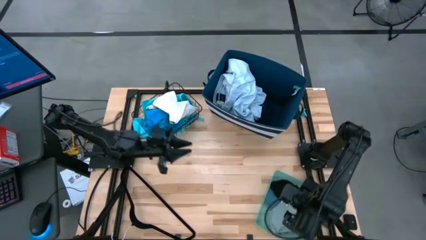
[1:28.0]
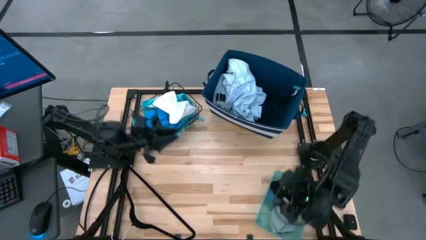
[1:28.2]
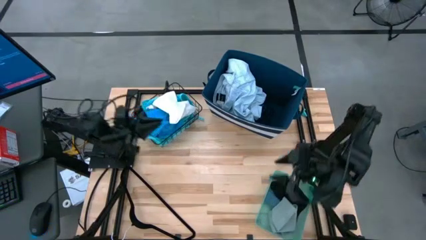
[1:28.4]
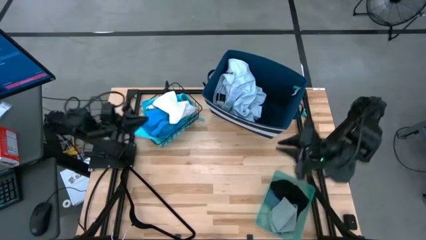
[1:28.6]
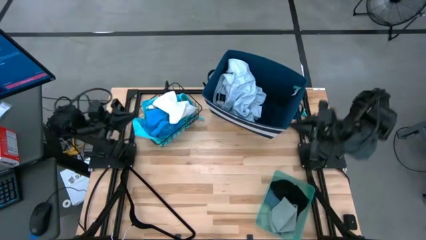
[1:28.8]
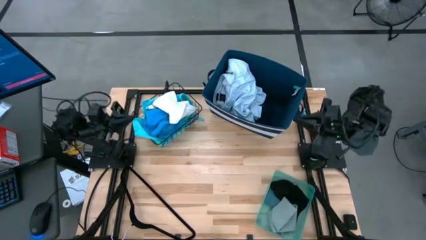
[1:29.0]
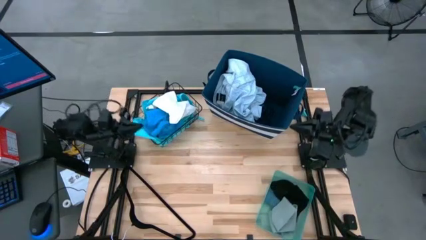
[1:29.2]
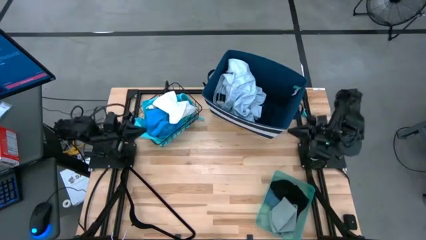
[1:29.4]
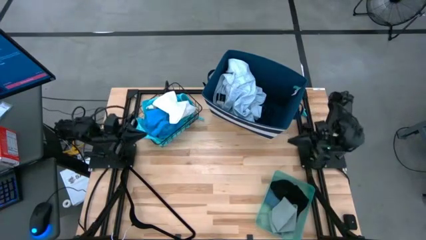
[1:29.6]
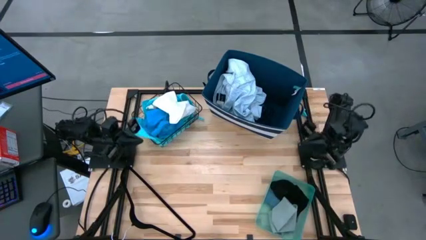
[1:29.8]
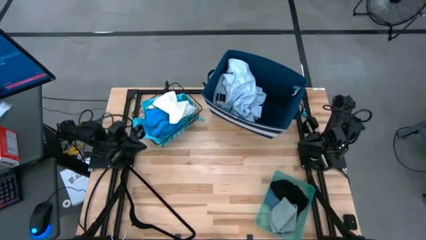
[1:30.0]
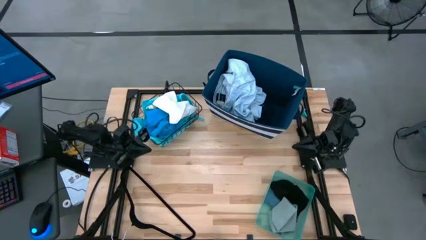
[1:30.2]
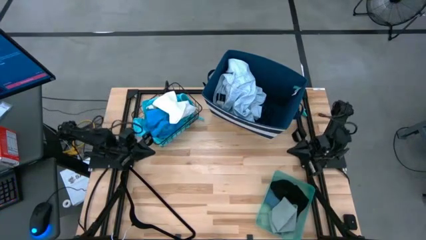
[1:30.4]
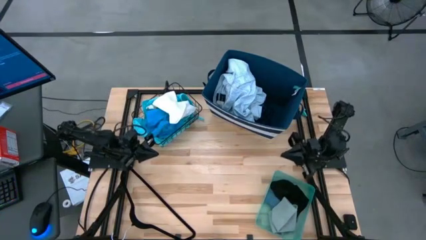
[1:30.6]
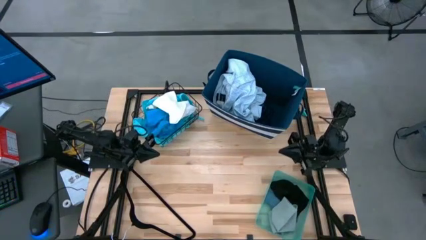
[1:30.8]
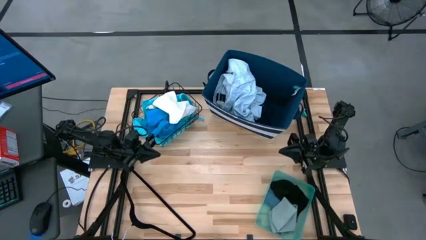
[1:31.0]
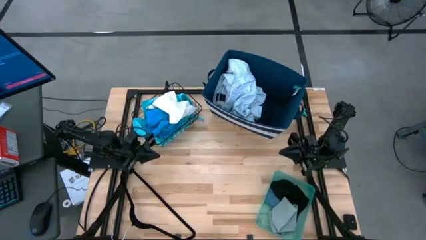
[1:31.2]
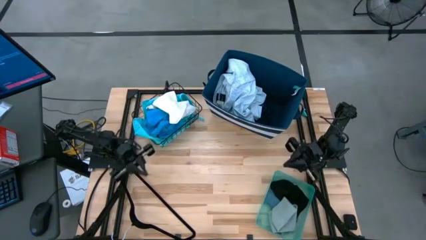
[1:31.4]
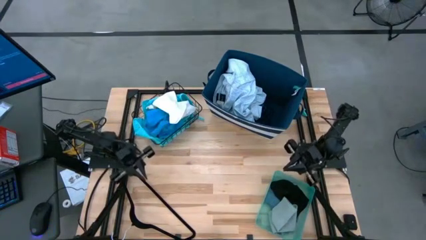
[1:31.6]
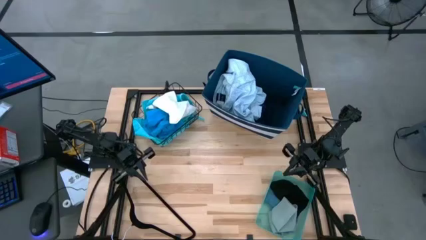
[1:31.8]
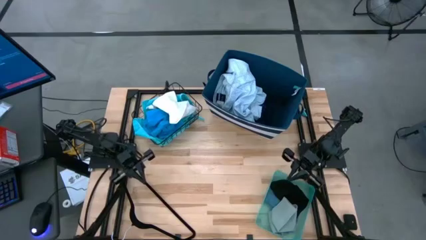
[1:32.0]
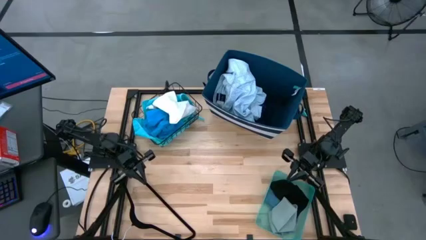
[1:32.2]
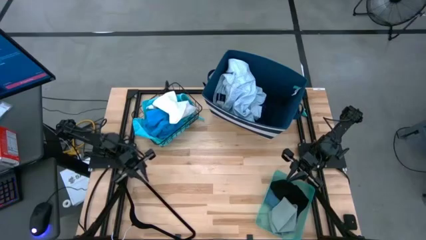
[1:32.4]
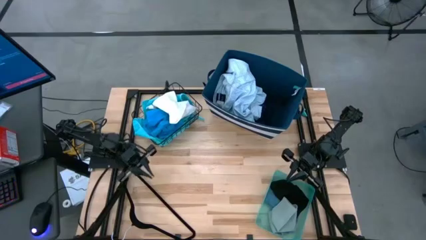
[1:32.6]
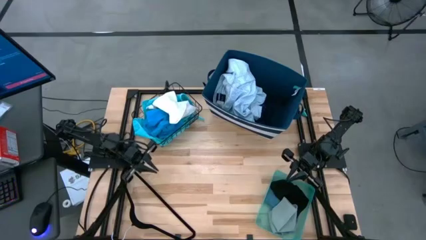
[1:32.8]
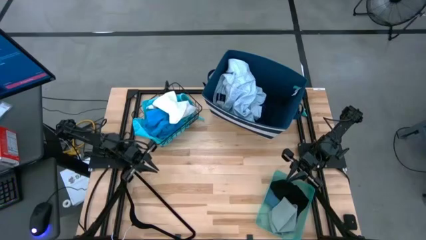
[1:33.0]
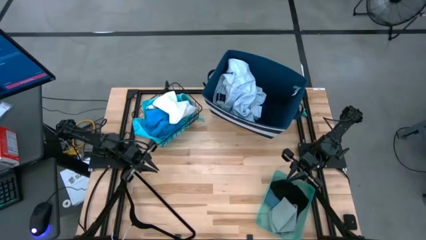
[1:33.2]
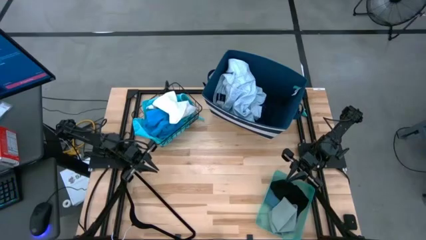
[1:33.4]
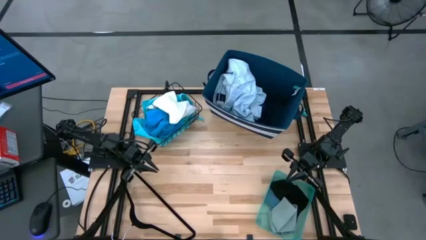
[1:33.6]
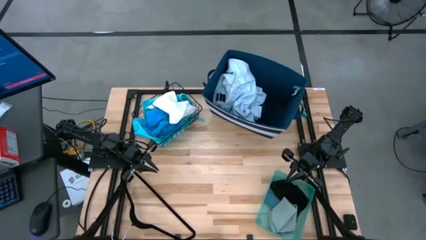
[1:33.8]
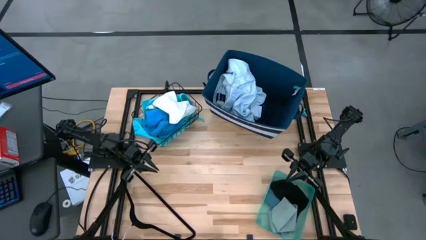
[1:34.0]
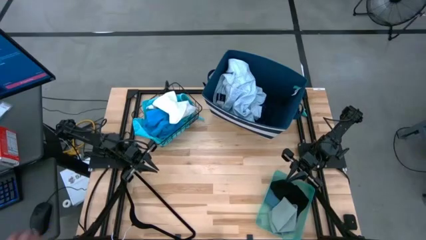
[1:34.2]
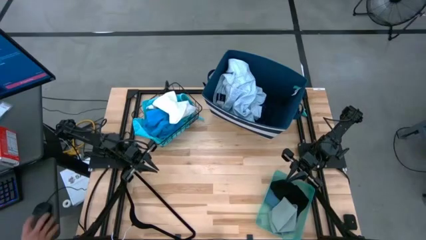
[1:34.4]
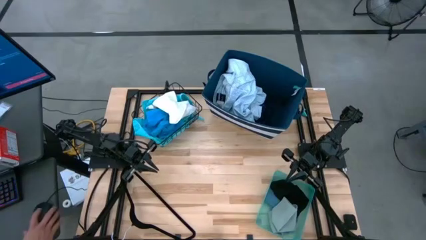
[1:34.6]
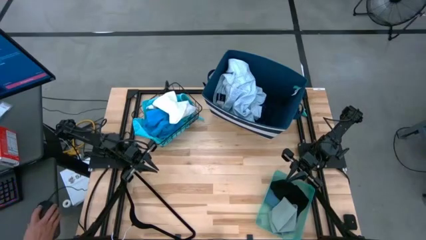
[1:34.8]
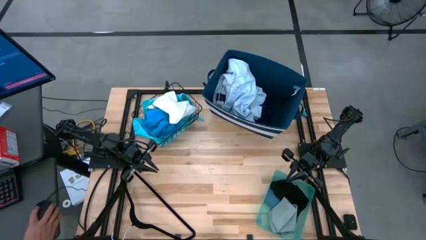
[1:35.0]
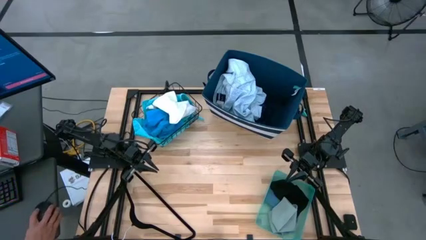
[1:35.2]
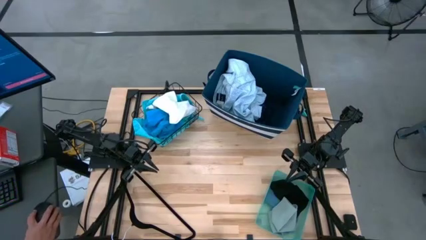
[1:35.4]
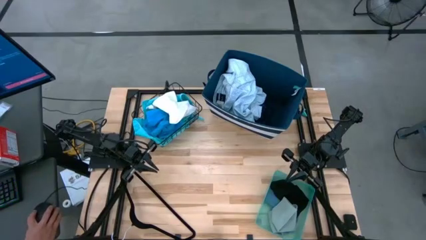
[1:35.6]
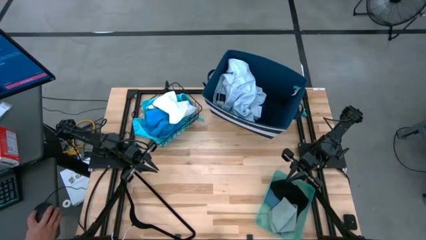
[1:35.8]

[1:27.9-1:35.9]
Task: Pick & Place Cloths
Return to Home Position

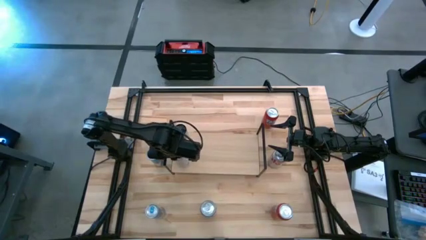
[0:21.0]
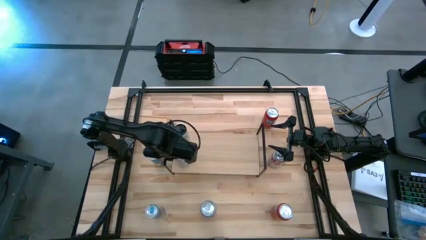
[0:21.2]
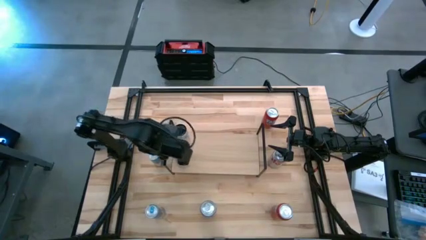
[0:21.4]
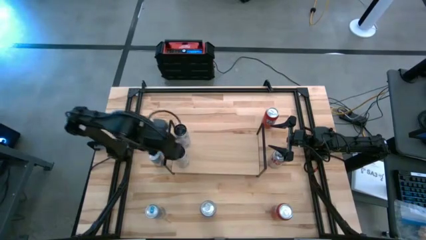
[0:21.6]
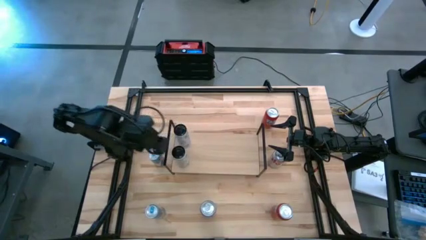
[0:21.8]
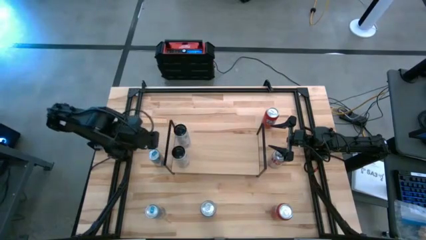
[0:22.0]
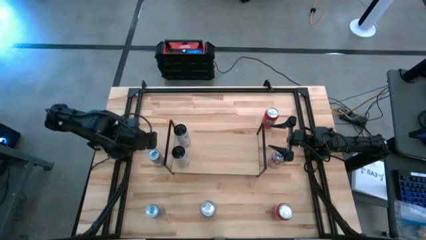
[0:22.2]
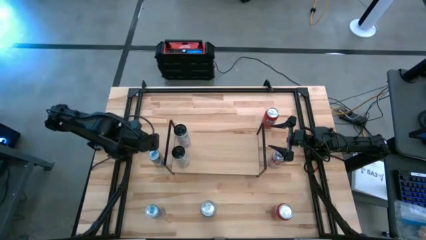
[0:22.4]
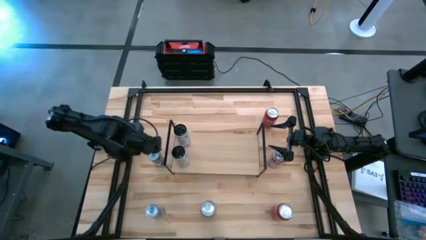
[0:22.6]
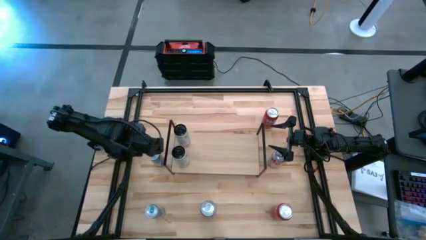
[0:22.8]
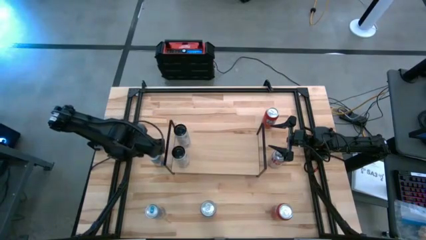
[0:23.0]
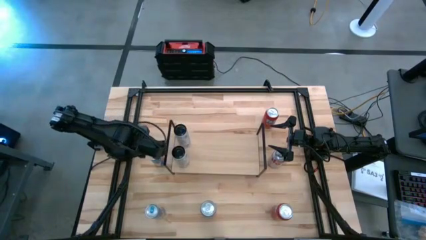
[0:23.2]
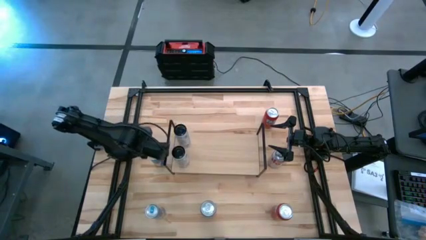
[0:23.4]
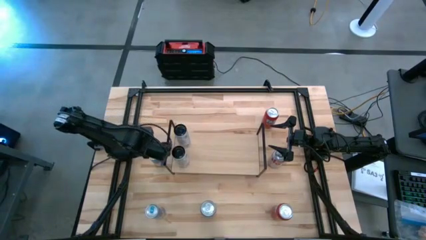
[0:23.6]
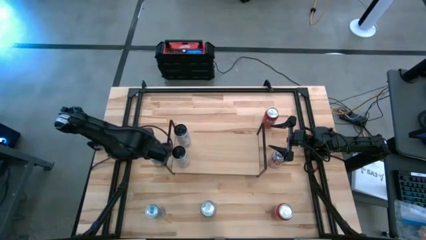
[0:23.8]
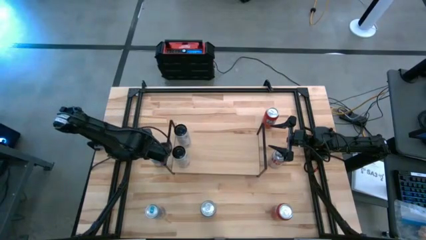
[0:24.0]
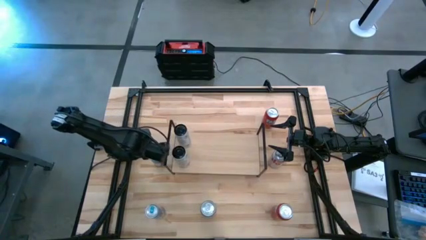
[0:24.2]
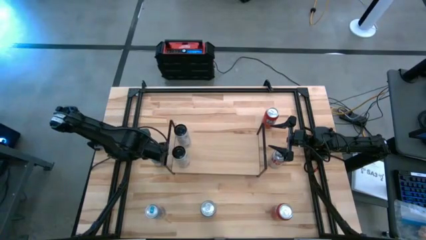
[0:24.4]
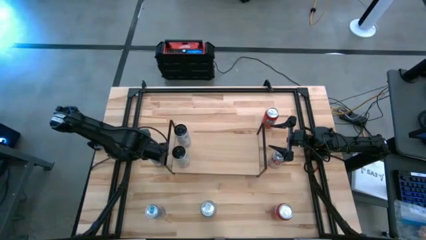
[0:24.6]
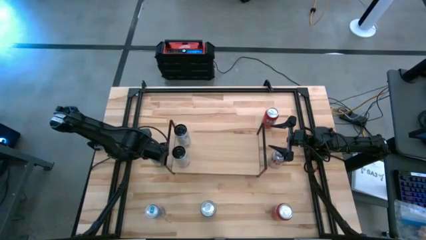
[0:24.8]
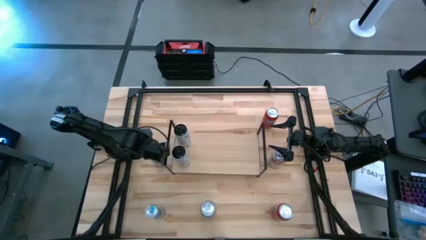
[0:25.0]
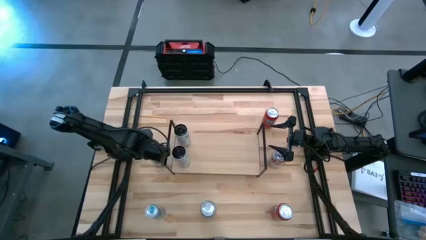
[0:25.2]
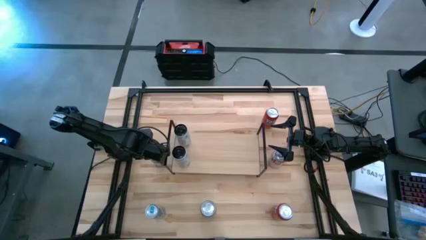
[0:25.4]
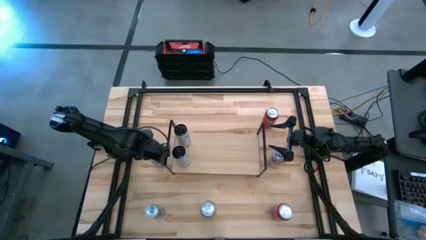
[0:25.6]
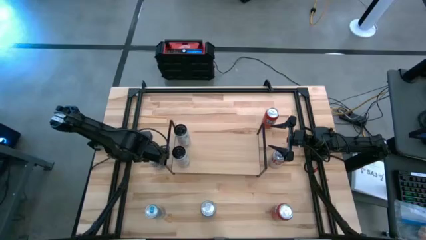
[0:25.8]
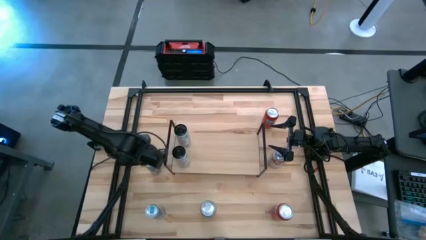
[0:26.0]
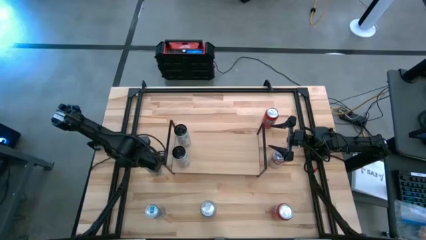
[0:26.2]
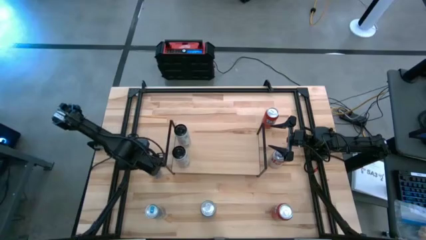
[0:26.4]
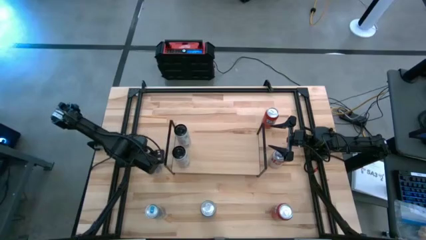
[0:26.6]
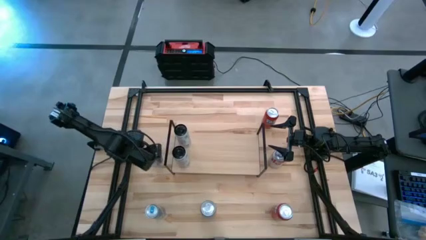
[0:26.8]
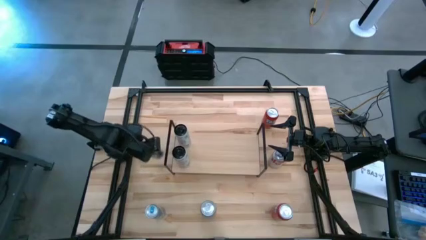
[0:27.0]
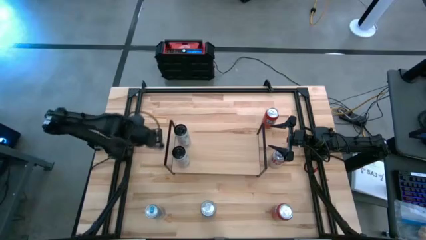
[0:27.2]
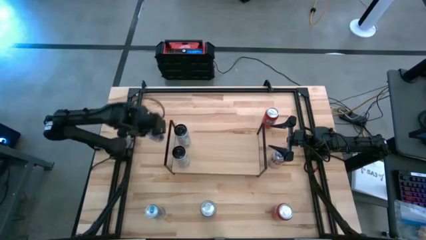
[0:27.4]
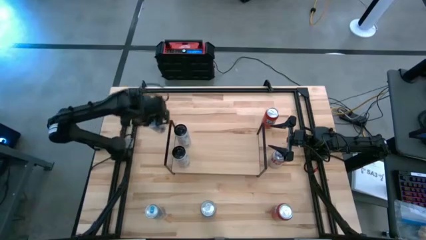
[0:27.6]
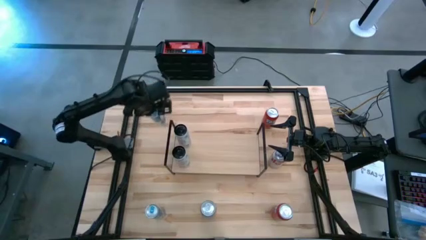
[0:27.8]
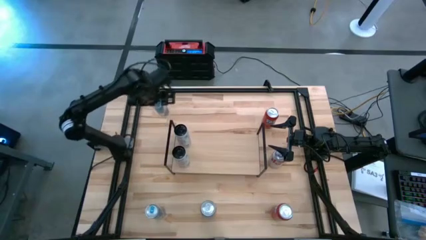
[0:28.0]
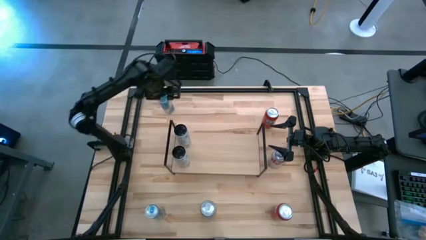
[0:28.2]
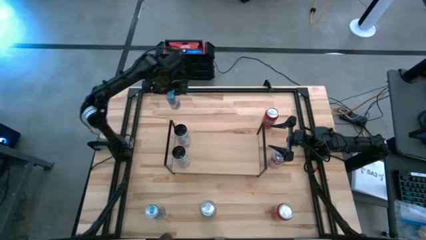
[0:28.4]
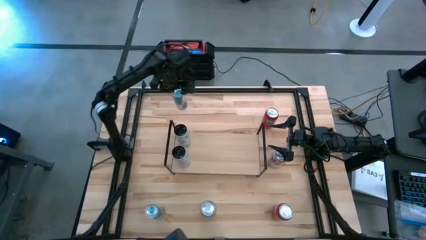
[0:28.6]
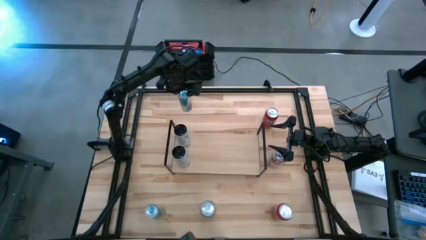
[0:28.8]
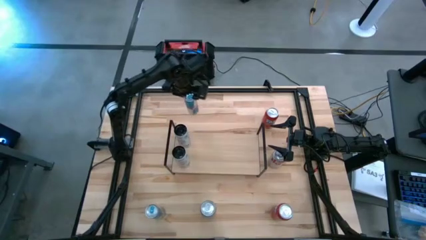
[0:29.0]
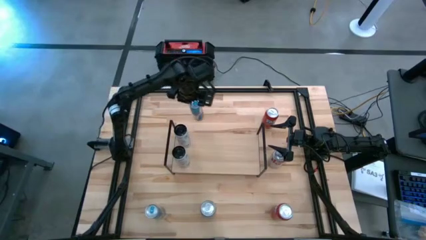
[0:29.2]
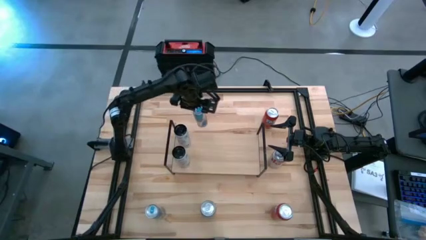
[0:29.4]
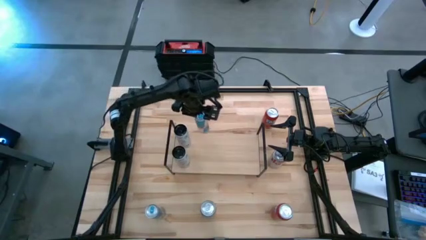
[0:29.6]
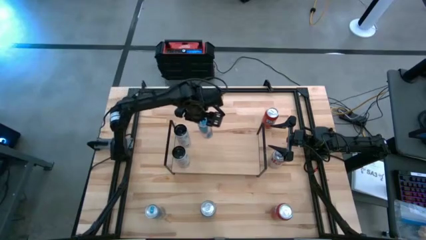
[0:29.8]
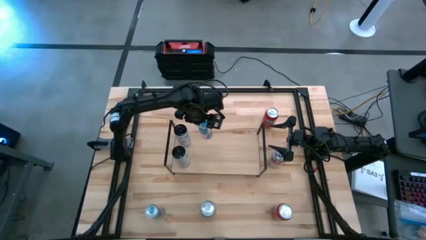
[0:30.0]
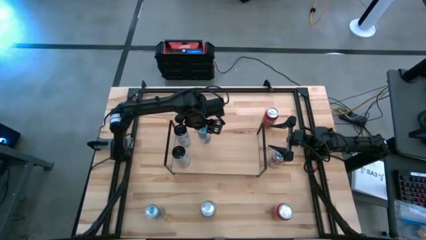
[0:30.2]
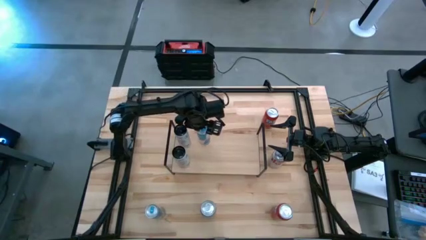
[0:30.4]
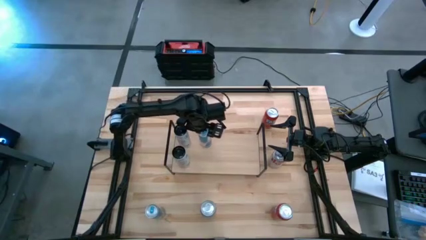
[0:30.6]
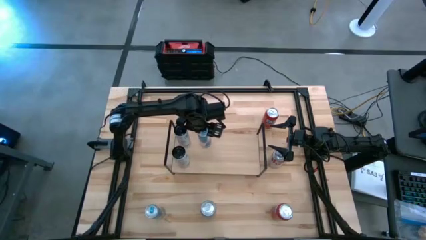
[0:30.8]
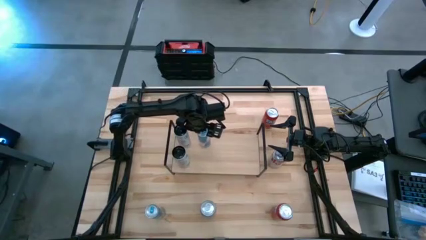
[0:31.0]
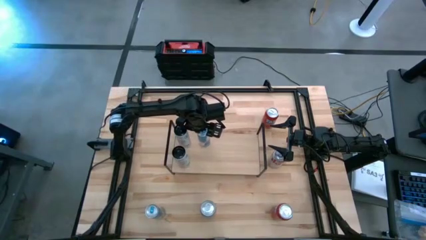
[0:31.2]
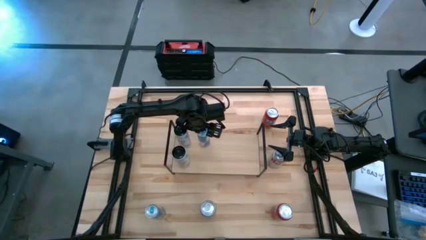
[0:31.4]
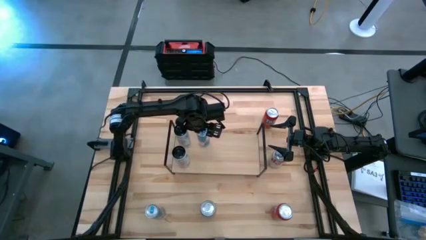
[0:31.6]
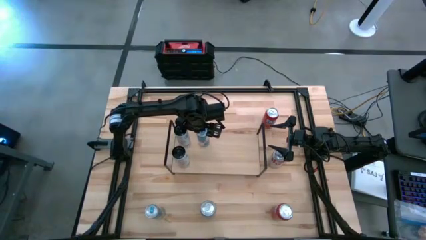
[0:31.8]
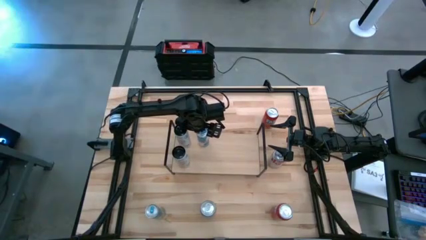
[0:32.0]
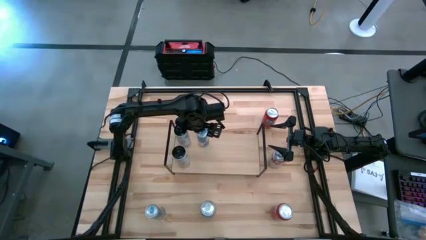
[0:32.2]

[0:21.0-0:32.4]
Task: Place canned beverage on shelf
Put the top blue soda can on the shelf
